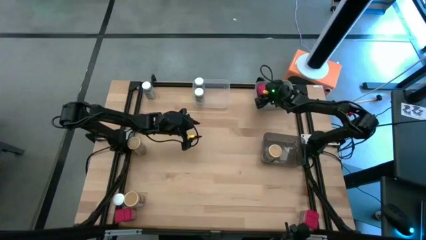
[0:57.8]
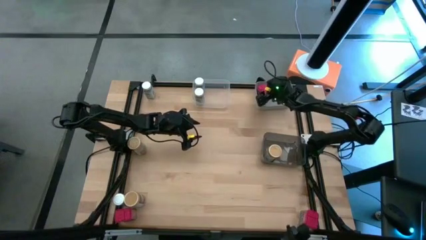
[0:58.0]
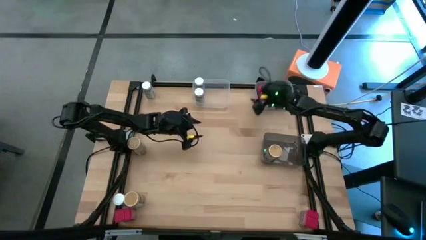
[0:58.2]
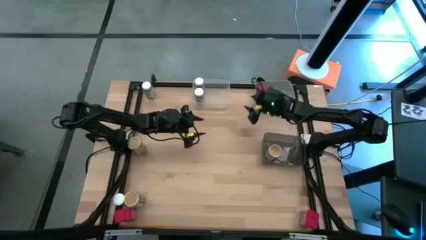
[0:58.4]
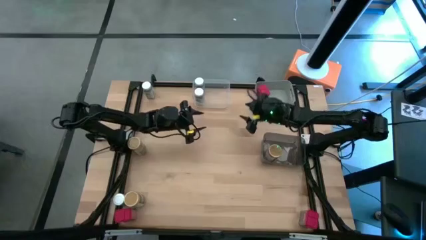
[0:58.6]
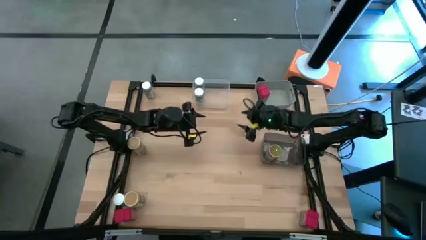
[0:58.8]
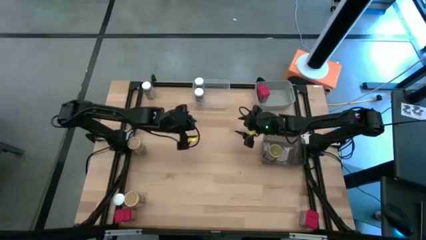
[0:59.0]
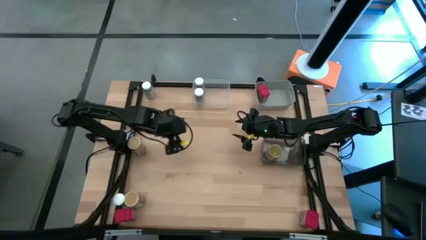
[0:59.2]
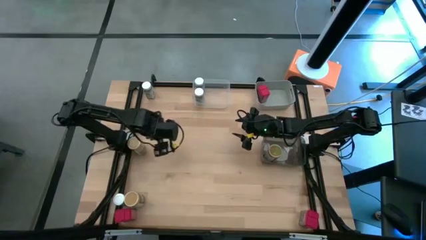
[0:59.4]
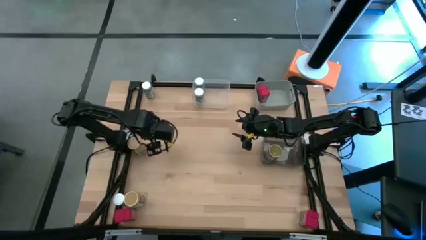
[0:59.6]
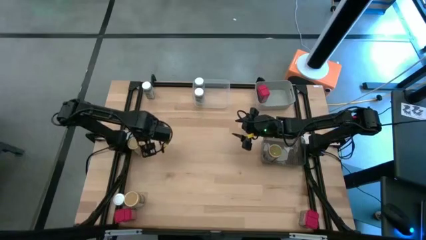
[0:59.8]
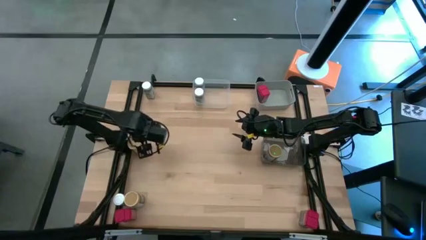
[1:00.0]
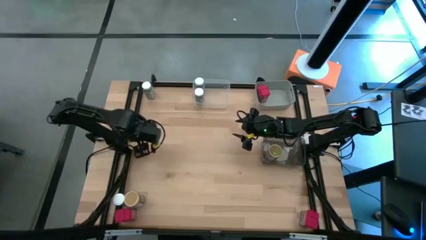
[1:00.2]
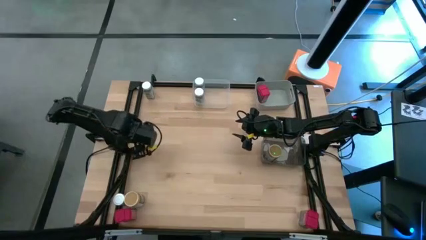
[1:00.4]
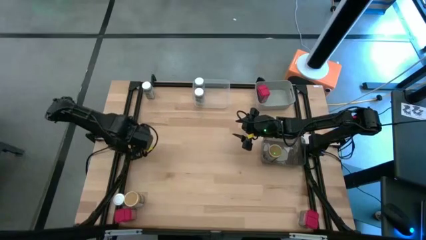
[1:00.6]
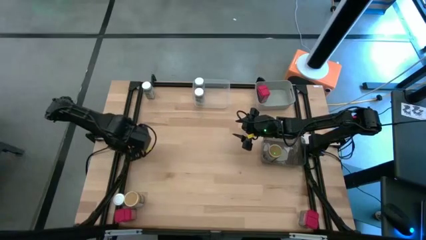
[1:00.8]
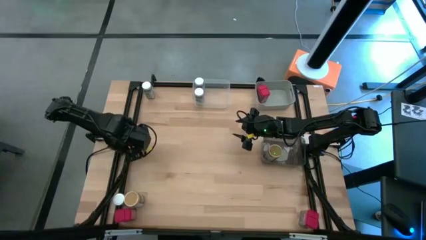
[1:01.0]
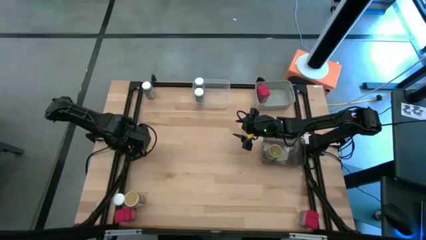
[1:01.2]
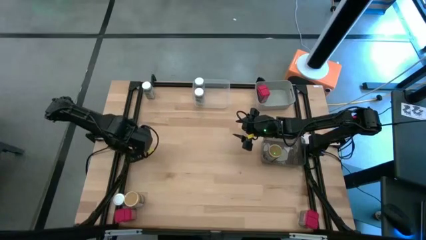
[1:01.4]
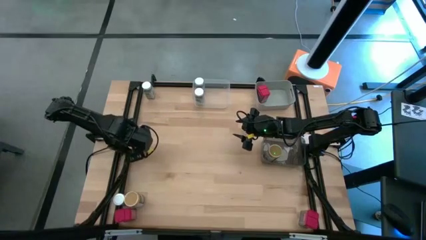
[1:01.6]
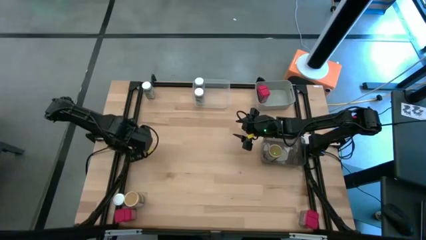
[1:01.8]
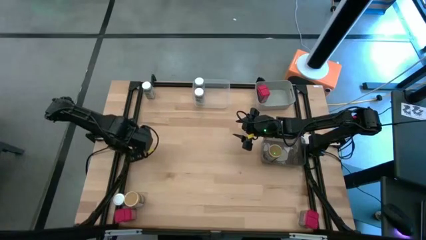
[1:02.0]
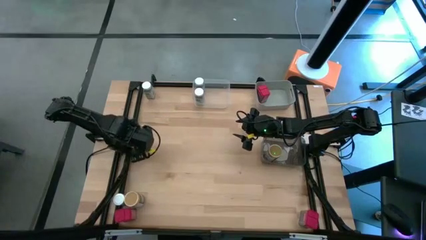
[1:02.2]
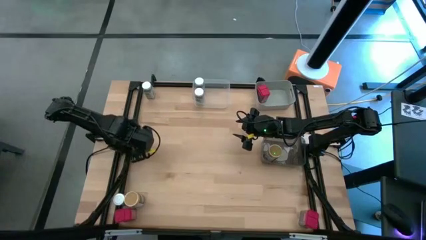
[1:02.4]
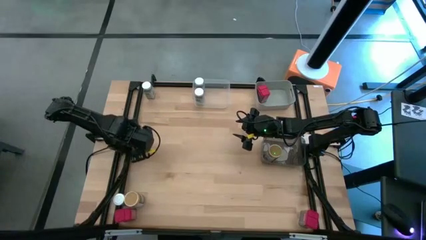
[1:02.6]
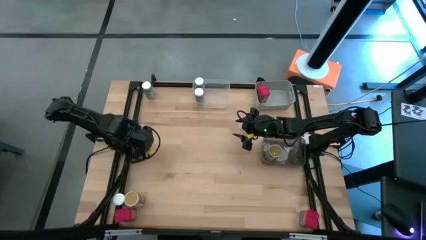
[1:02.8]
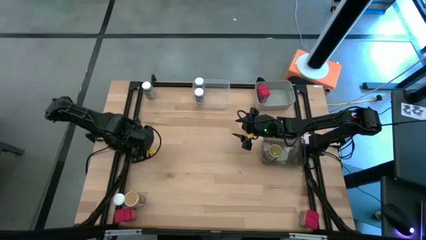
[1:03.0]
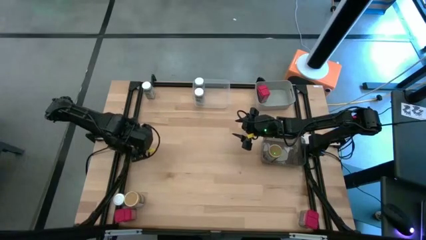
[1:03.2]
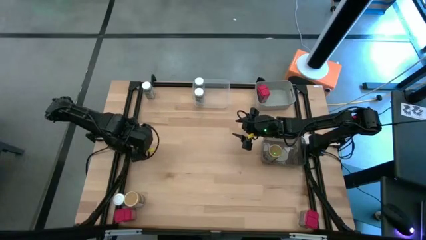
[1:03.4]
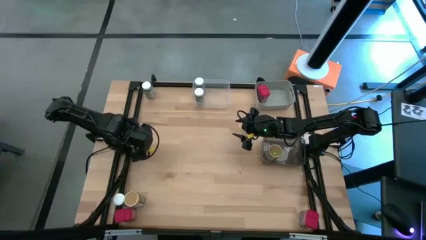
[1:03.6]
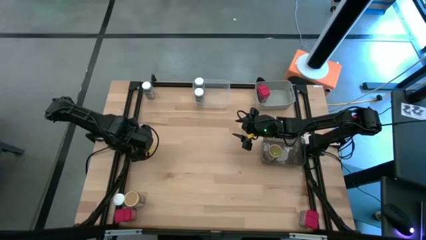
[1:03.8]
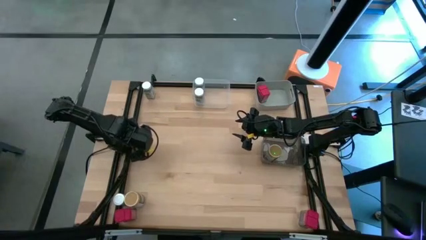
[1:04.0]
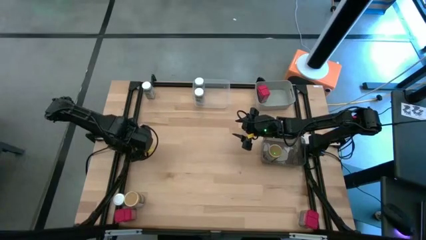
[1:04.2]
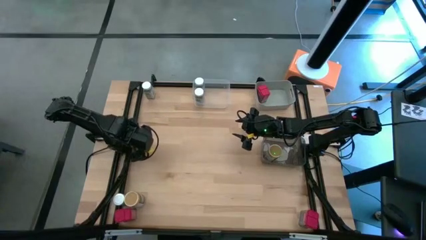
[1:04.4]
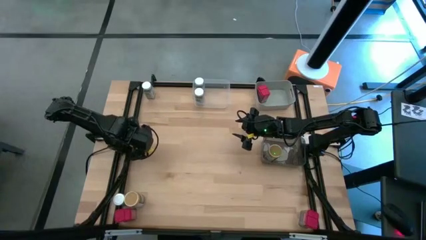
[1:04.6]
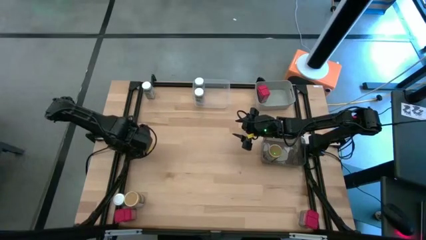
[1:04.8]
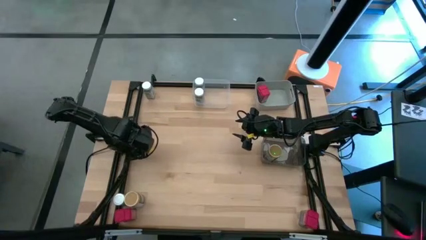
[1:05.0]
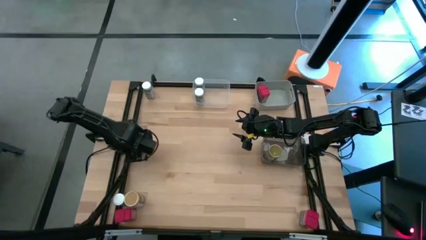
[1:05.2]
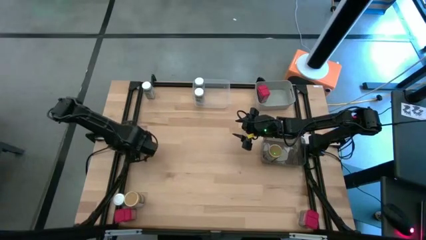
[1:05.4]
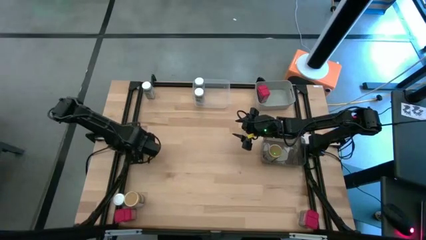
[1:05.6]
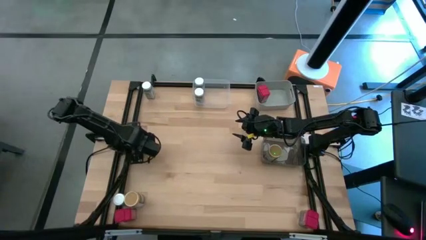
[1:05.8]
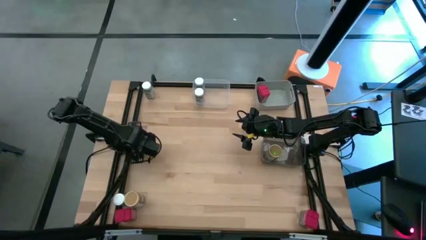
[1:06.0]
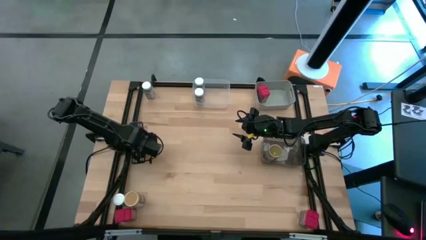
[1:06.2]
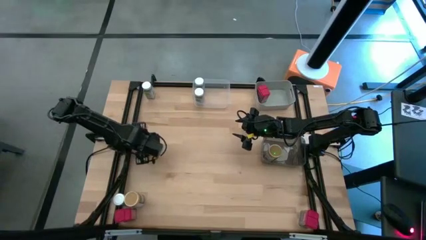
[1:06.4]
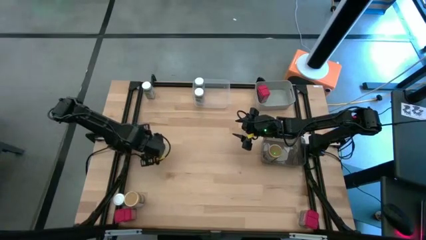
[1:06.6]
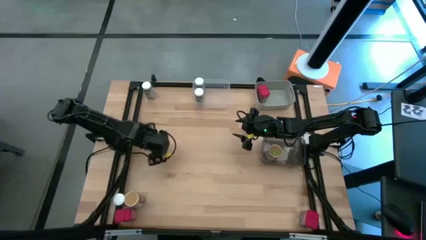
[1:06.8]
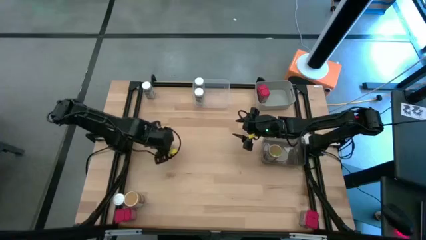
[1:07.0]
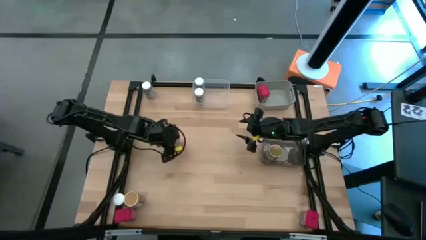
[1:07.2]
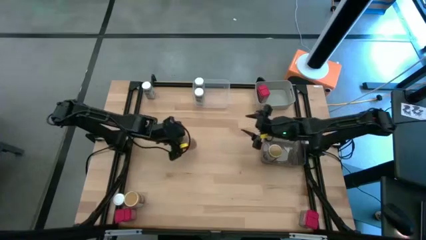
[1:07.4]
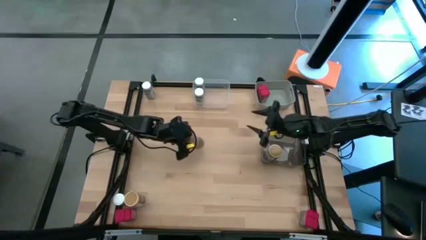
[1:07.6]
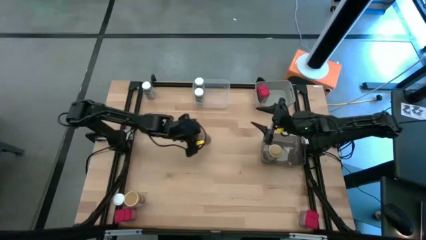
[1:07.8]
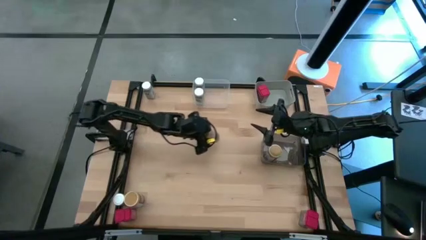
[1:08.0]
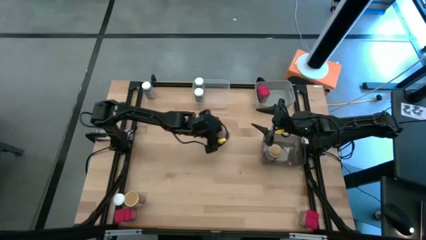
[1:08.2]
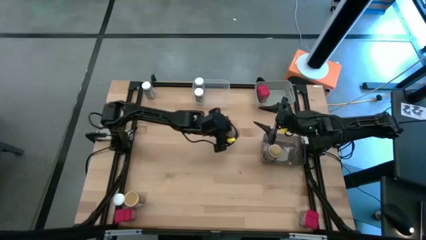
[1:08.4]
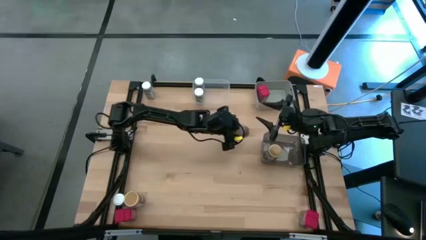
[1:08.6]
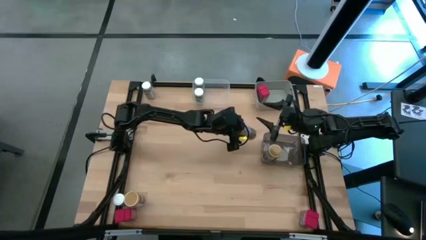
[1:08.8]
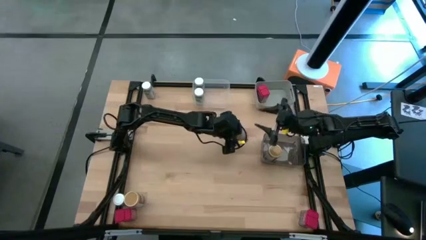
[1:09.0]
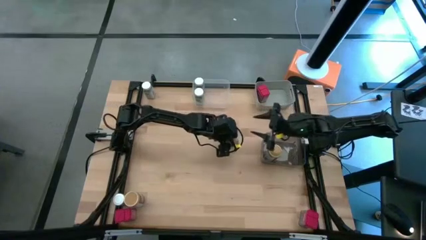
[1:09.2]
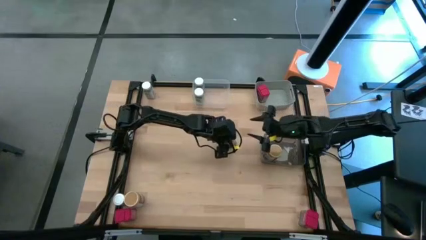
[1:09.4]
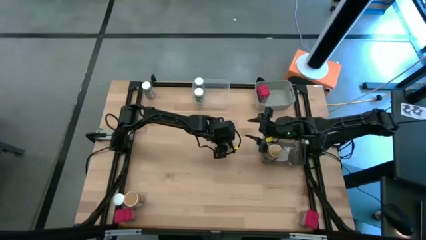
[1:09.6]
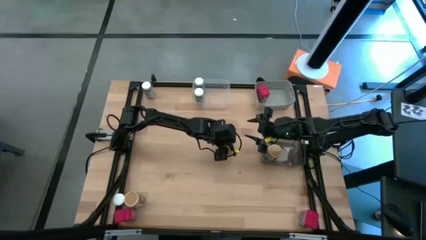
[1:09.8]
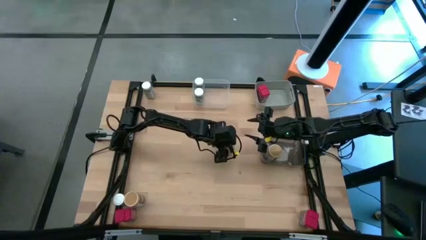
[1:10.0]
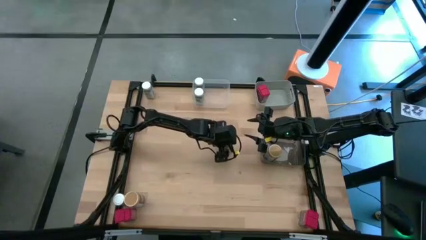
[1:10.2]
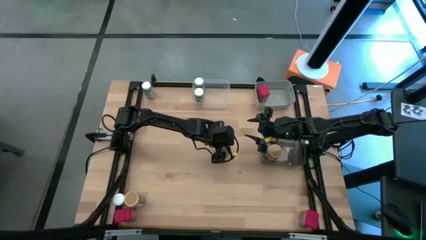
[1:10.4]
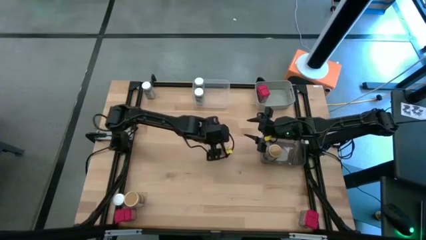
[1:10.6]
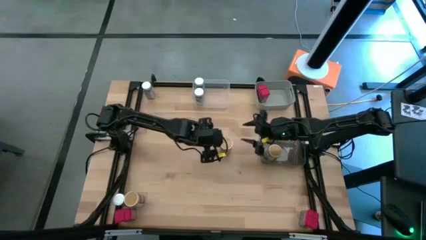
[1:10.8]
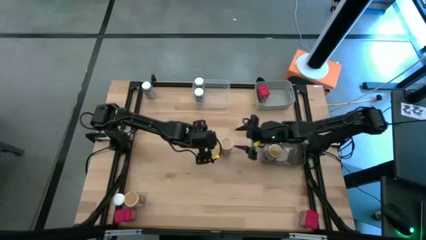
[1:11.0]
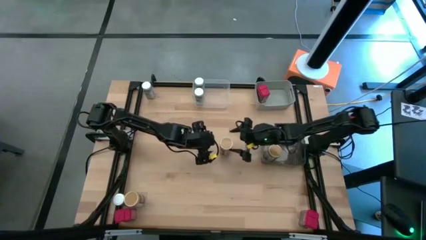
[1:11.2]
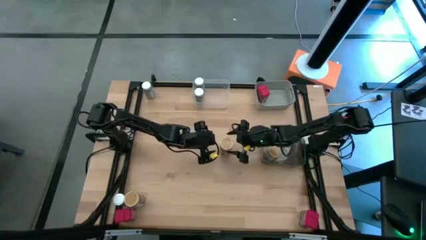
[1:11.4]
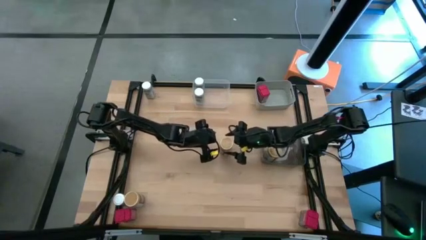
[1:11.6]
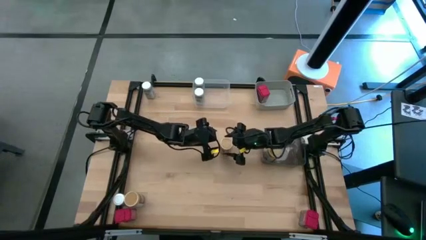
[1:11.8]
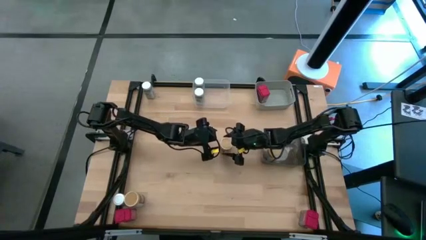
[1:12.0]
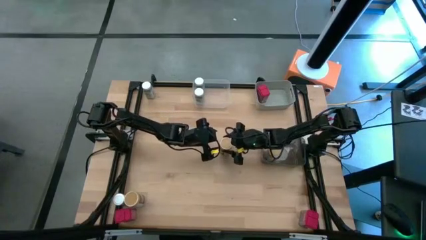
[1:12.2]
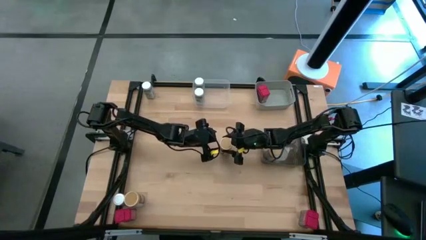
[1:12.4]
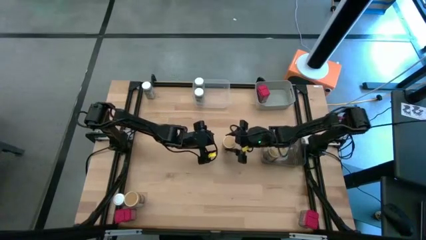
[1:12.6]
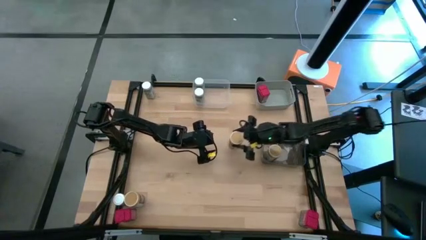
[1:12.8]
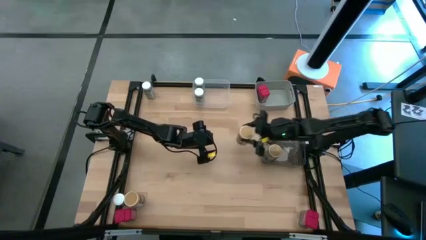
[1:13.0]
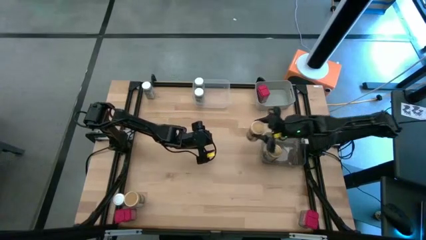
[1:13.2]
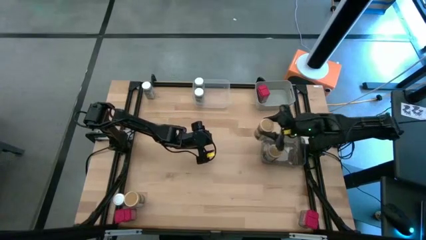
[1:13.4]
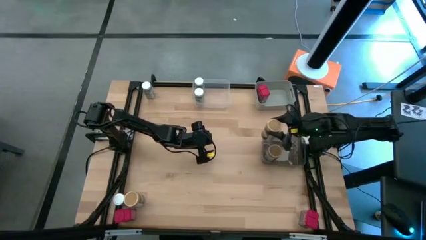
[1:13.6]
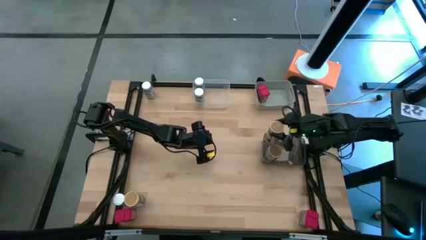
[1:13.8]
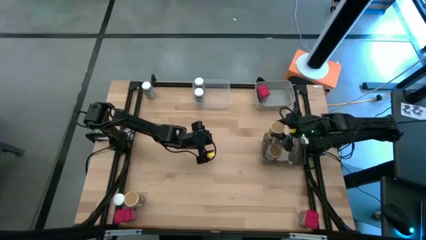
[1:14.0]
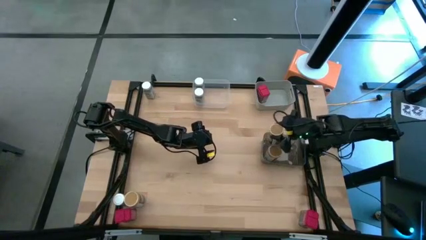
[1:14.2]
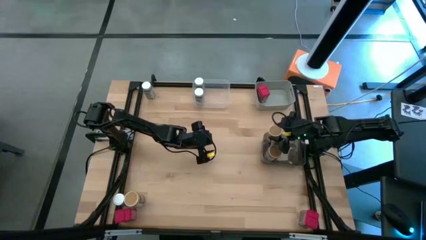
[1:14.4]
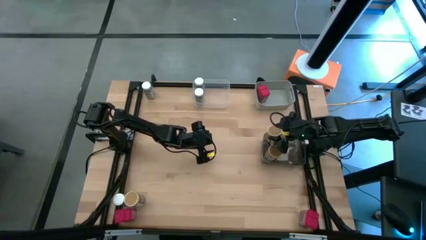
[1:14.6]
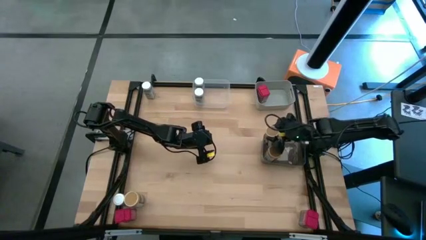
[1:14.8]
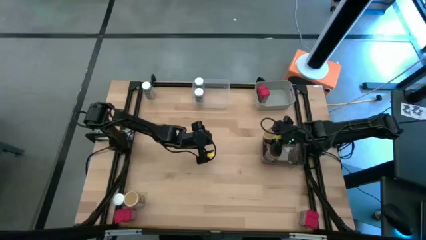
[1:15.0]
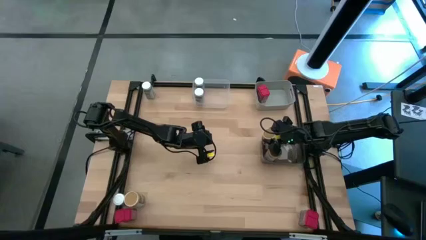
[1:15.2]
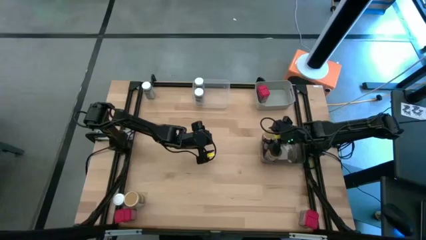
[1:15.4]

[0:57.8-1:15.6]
Task: Sort spices by type
Put the top brown seasoning bottle into the black bin
